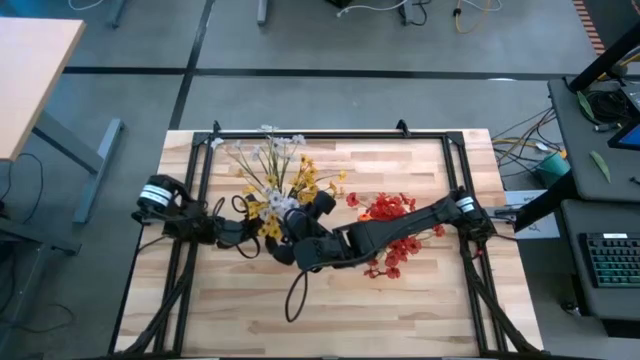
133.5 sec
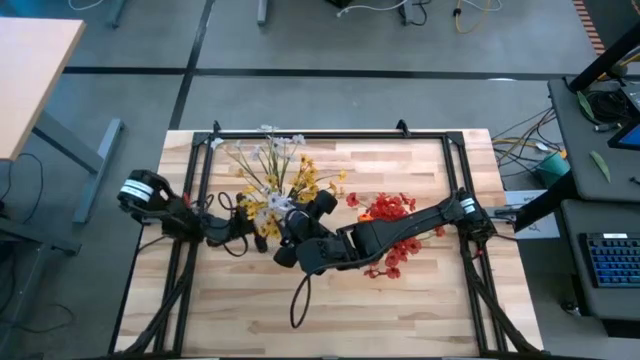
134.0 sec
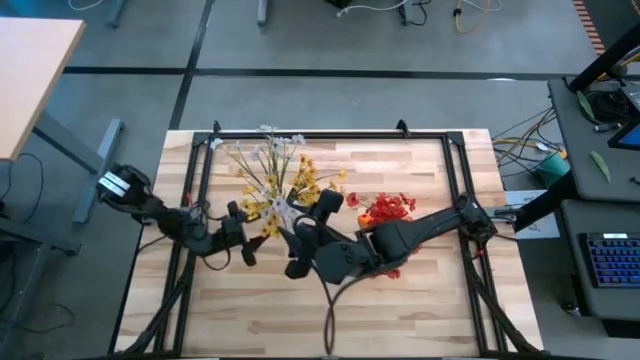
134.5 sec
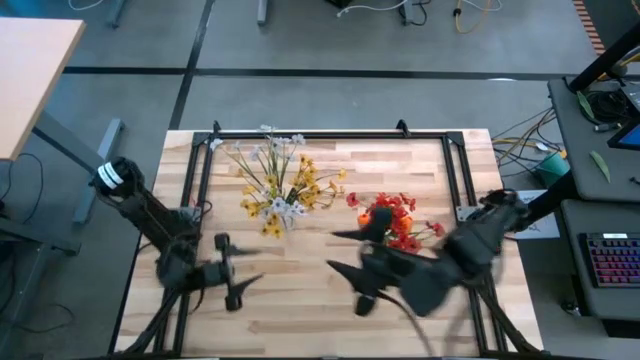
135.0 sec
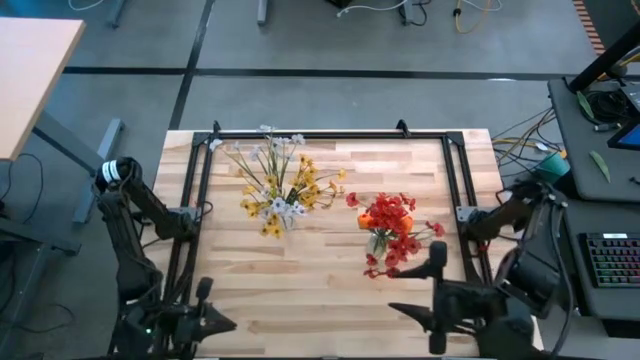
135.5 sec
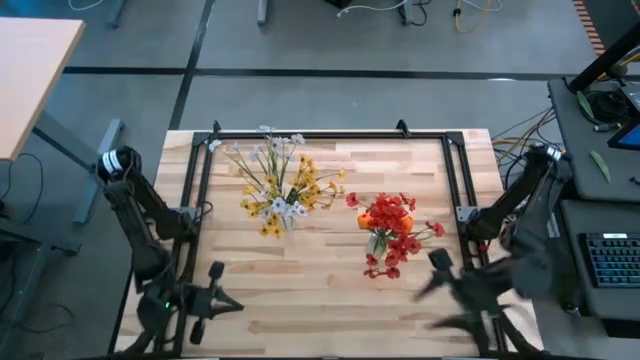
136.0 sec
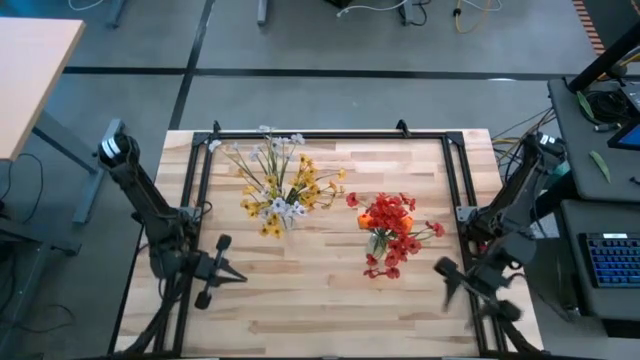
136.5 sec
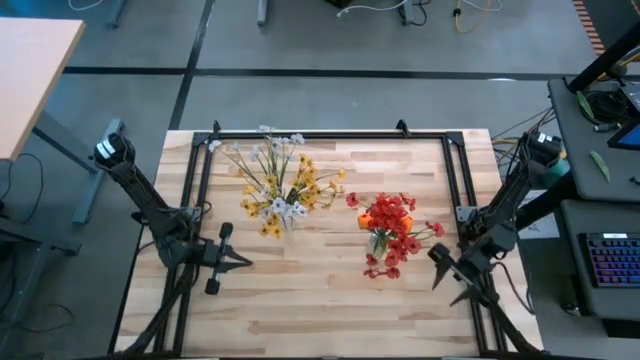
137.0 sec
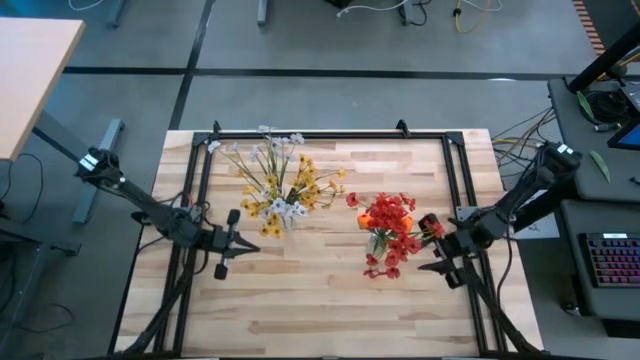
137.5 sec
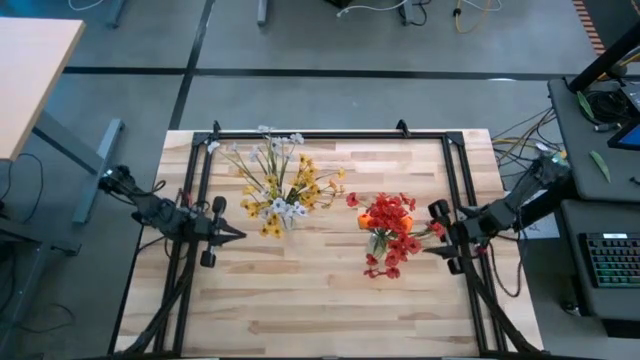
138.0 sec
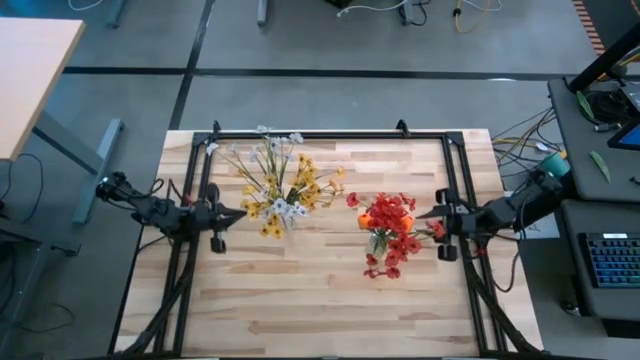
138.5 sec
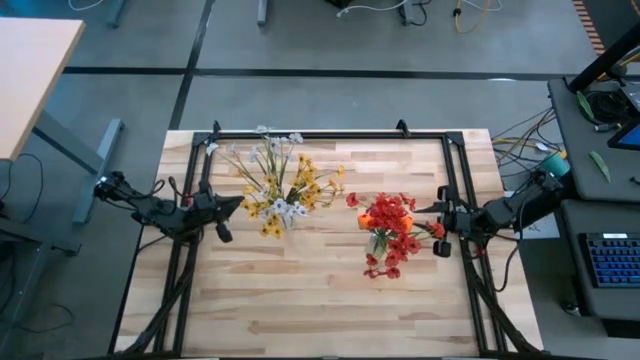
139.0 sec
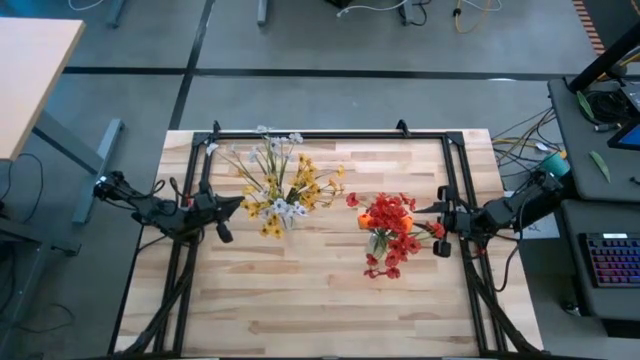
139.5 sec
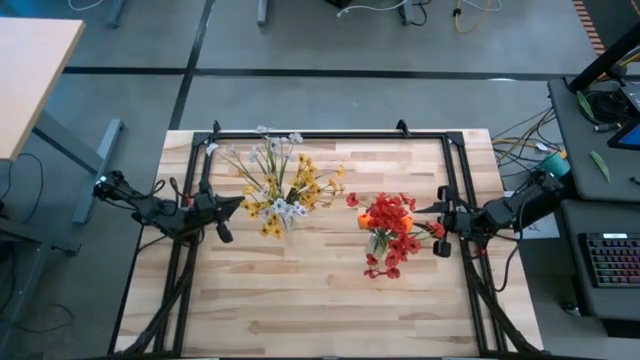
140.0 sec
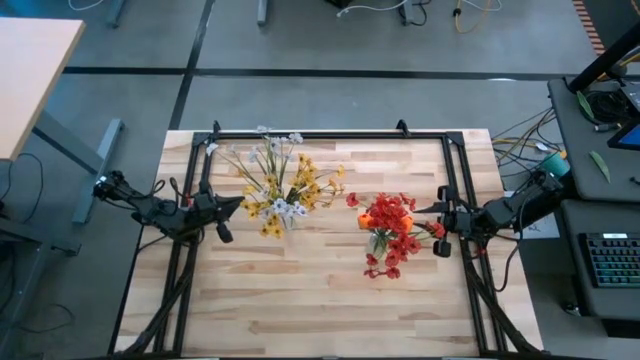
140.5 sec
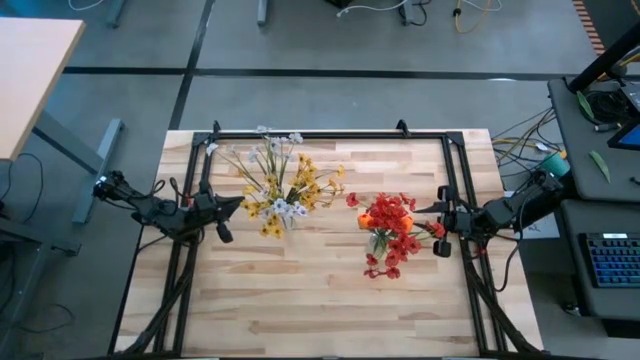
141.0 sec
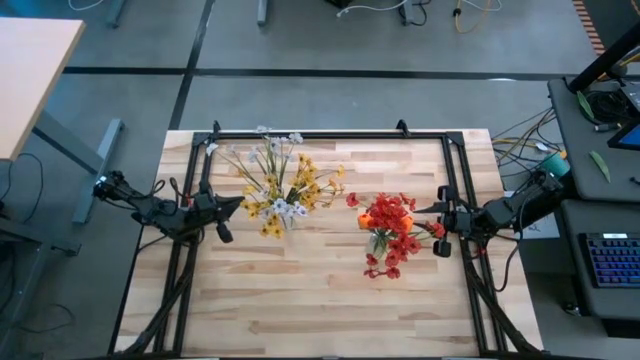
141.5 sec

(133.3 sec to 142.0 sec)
Task: Sort flowers into vase by color
Return to Home Position

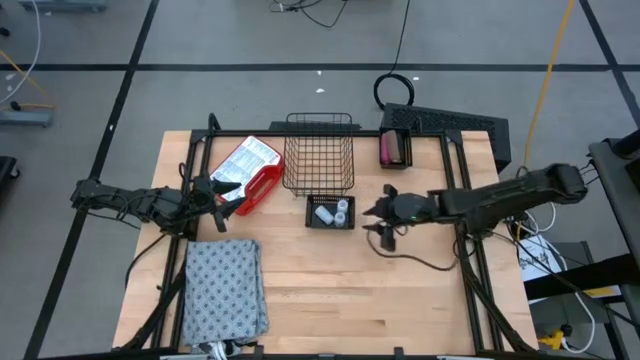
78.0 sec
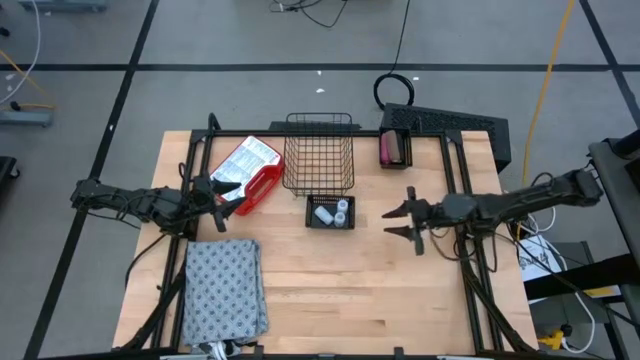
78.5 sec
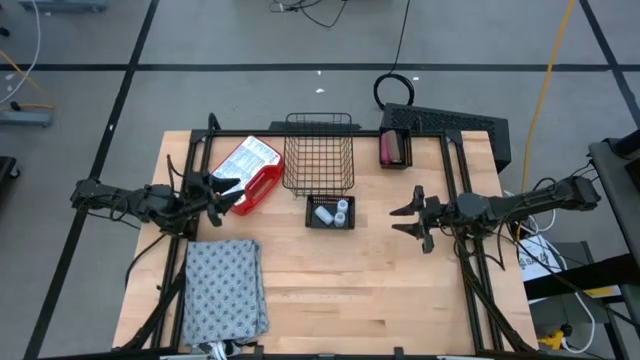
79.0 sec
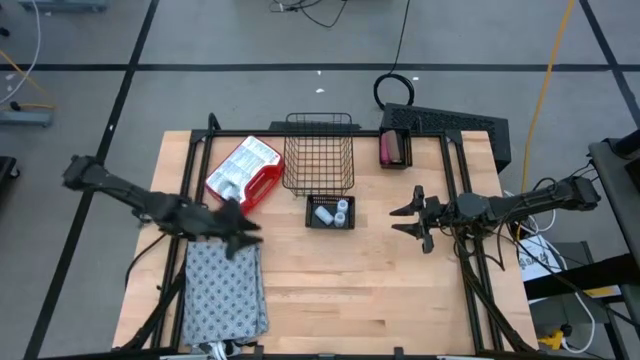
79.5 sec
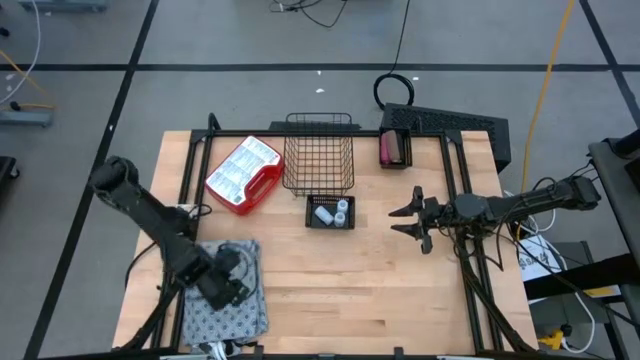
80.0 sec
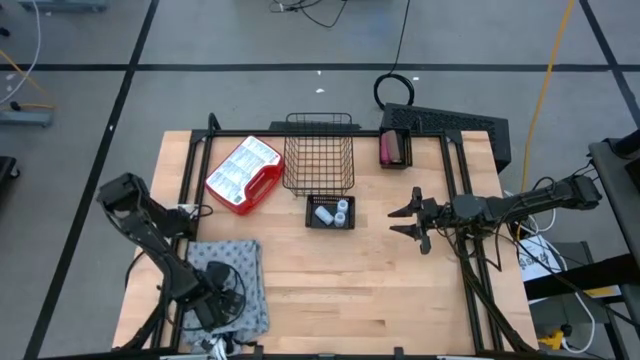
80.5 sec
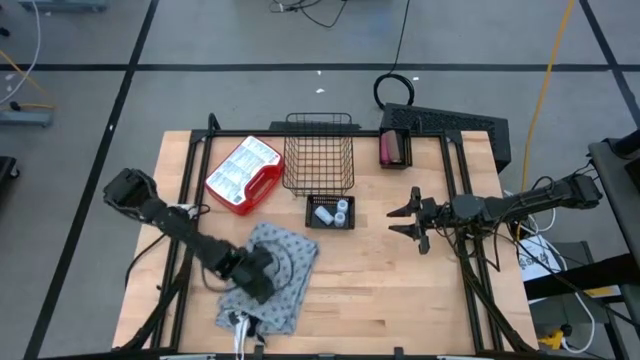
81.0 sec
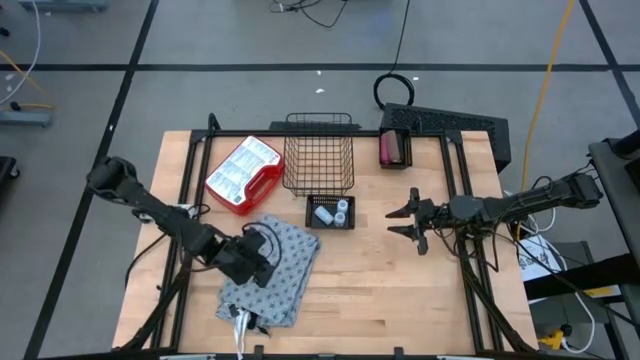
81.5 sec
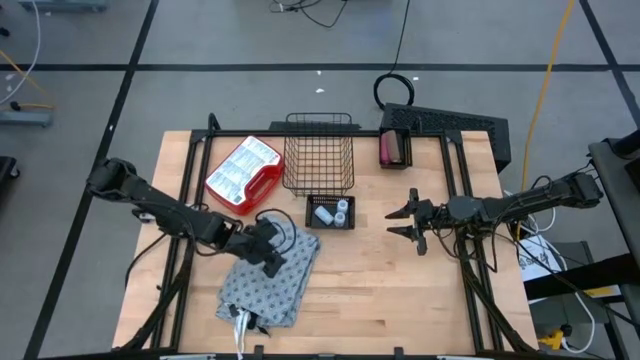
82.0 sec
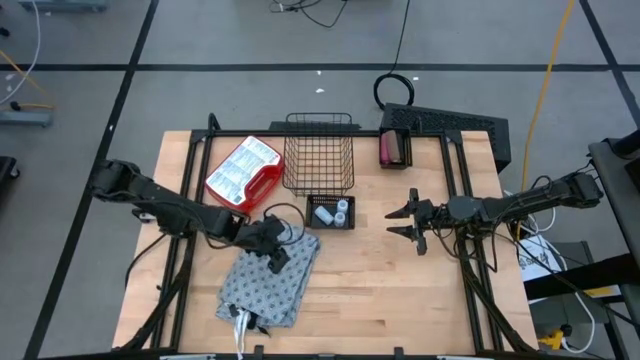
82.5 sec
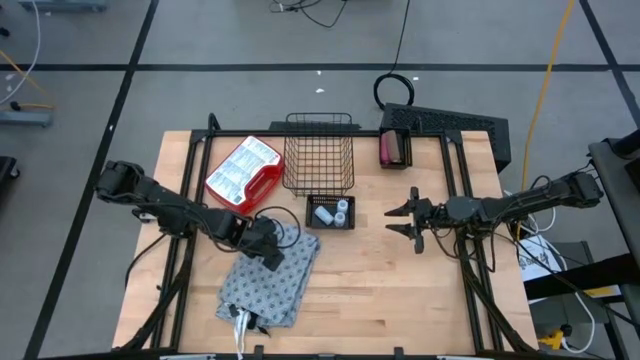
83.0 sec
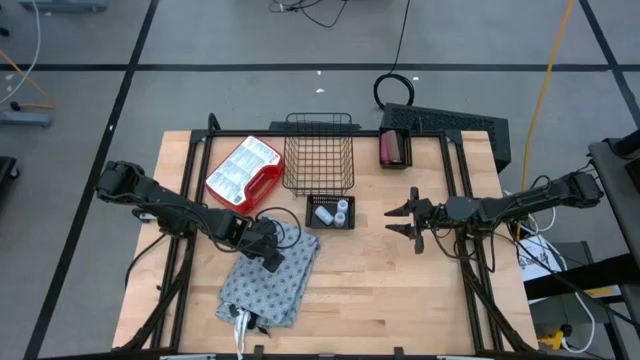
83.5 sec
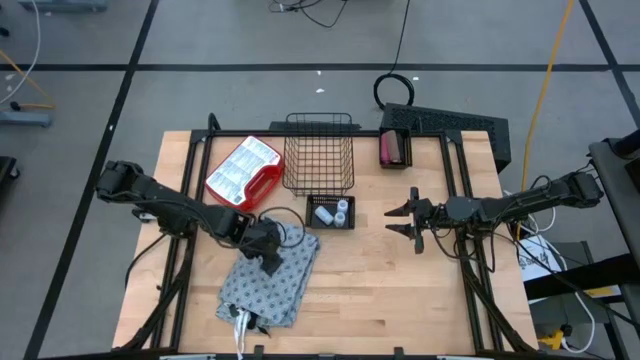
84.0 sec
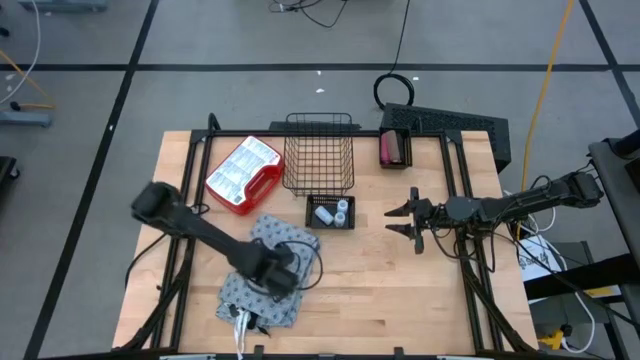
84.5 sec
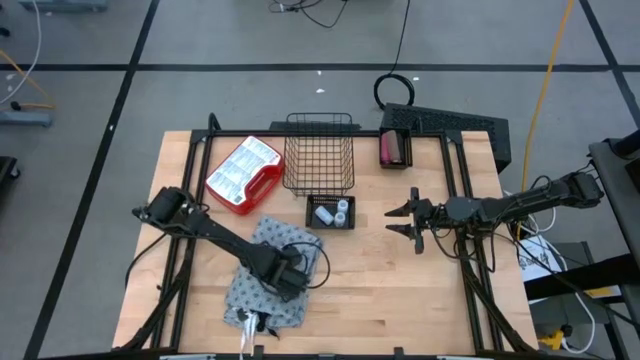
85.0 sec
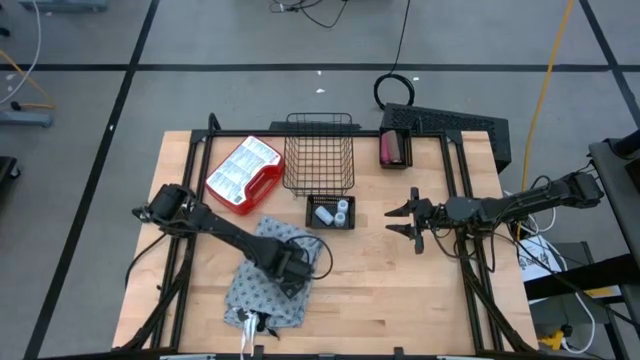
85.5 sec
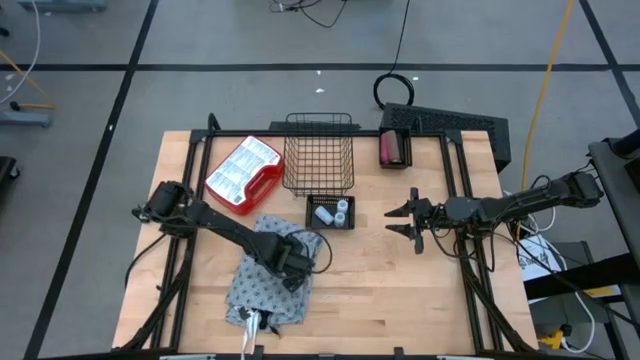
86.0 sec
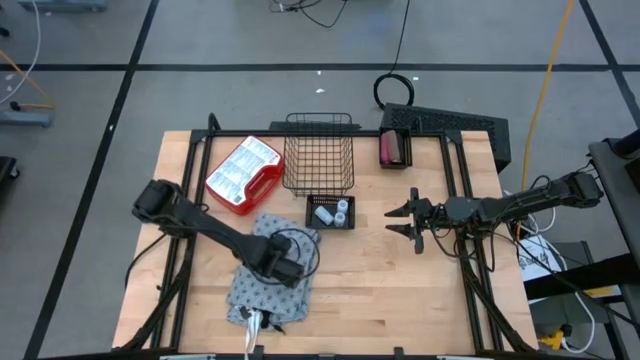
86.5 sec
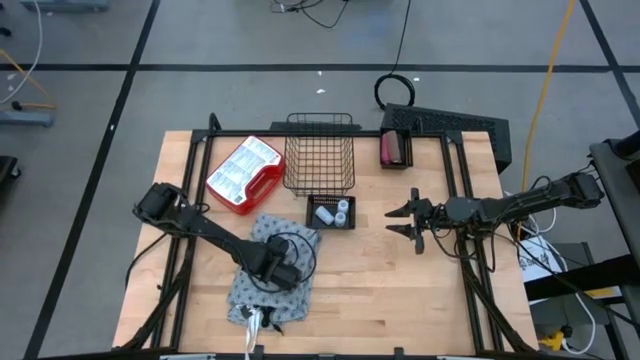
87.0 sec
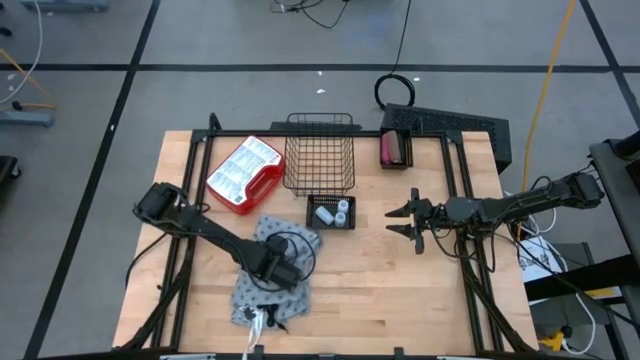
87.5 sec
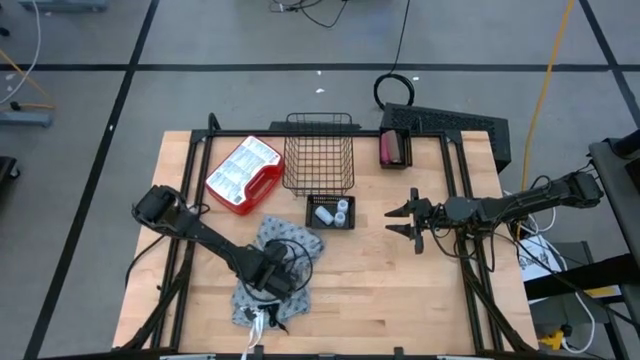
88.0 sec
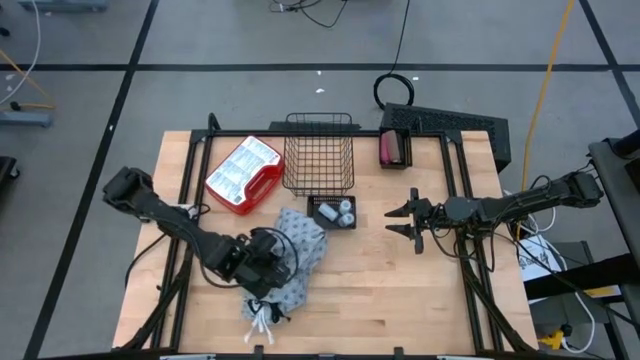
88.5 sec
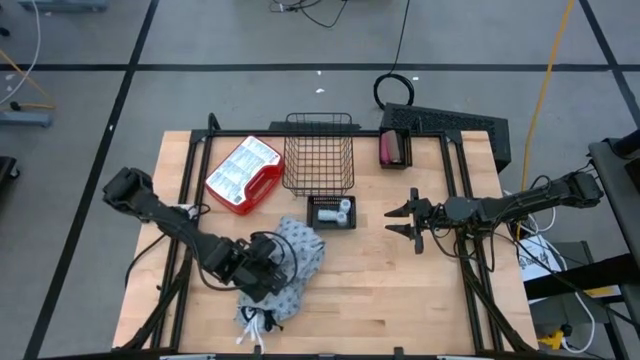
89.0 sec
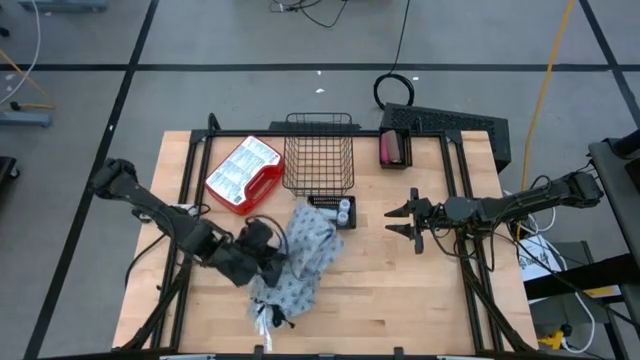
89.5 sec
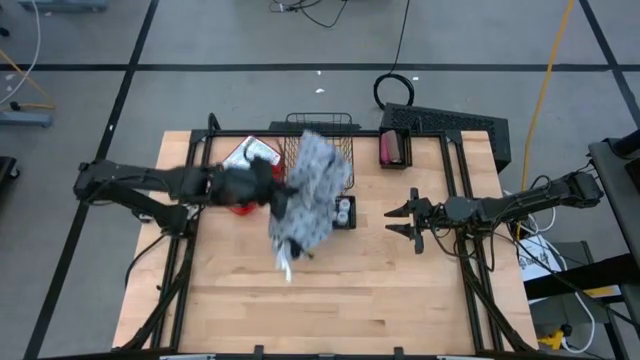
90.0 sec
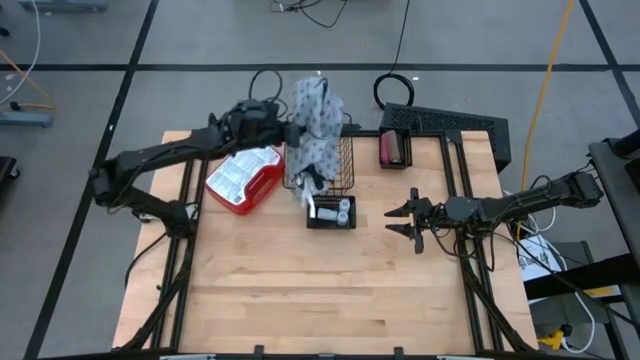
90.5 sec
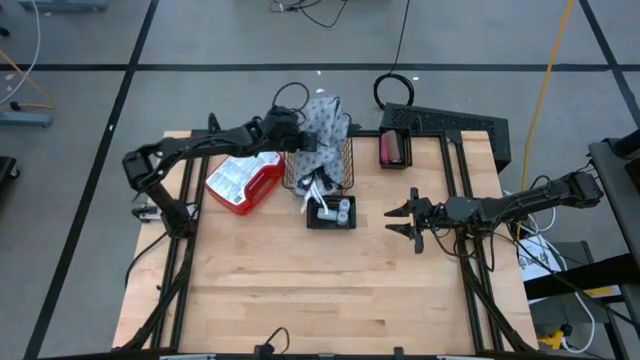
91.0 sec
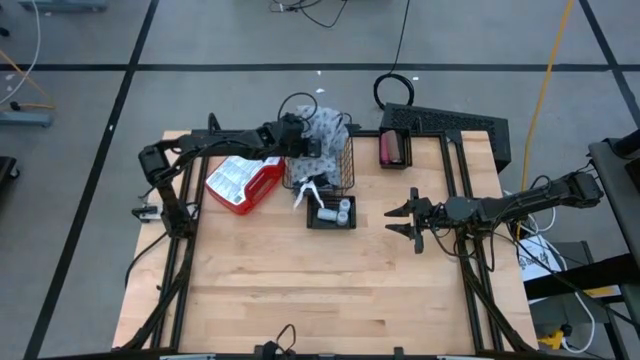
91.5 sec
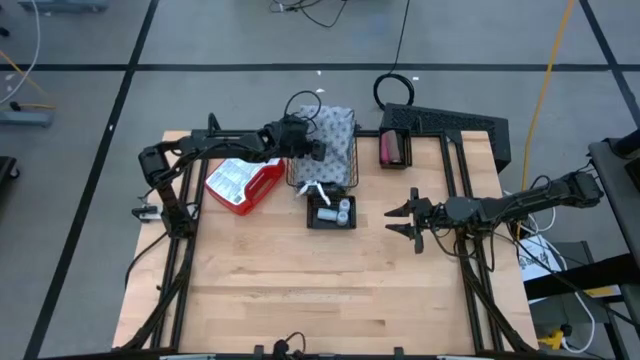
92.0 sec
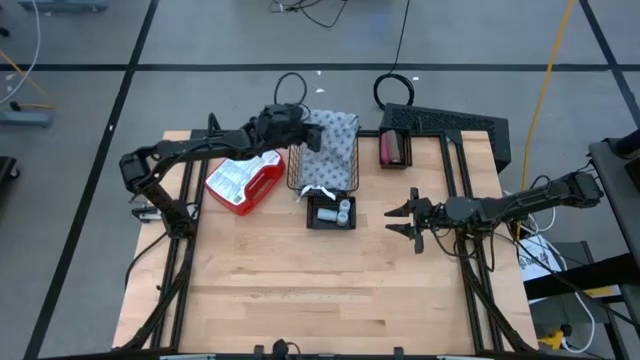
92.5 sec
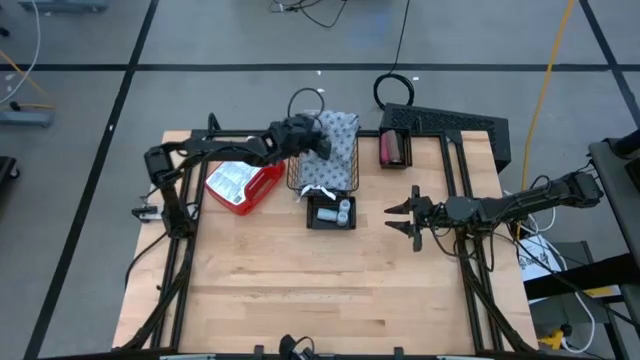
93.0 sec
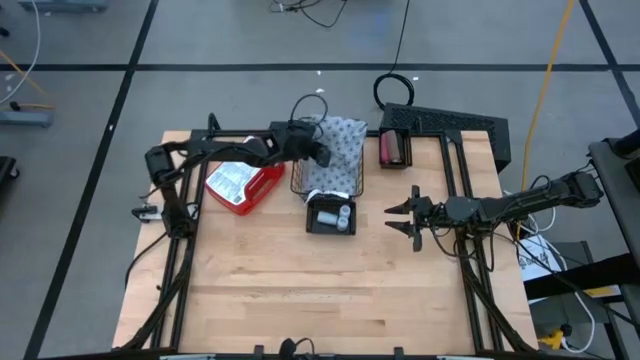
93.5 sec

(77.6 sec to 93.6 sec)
Task: Pick & place medical supplies in basket/bin
Put the blue patient gown into the black wire basket
